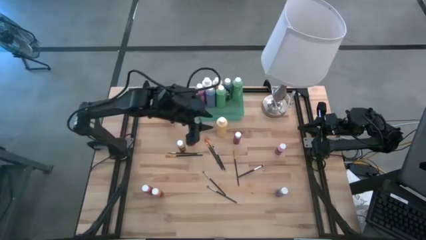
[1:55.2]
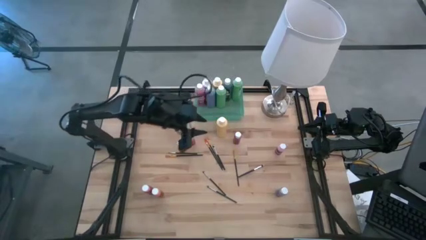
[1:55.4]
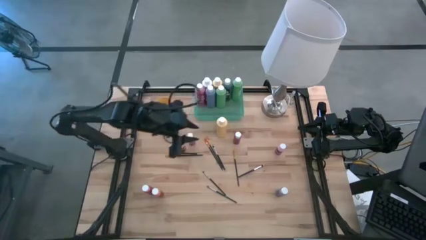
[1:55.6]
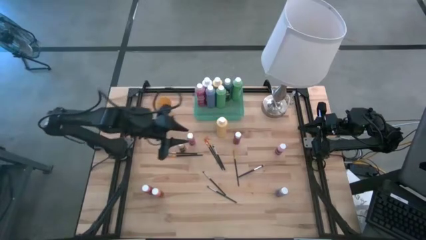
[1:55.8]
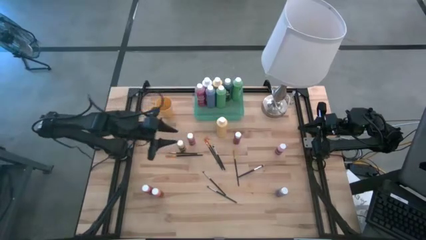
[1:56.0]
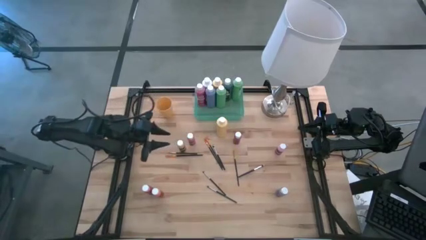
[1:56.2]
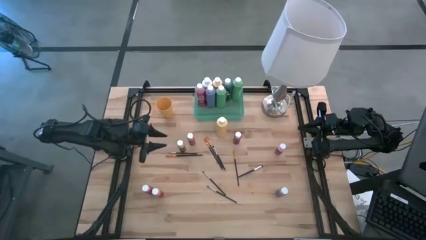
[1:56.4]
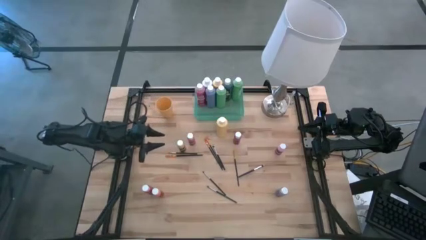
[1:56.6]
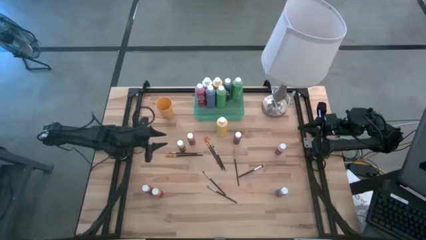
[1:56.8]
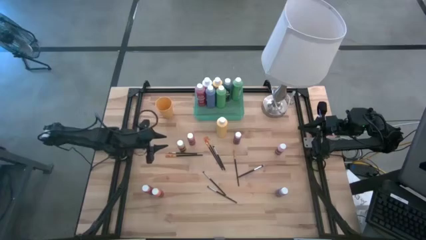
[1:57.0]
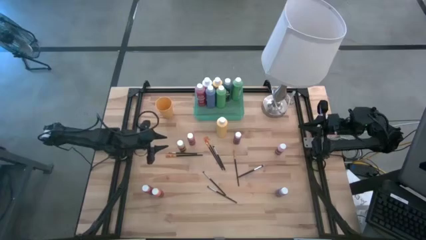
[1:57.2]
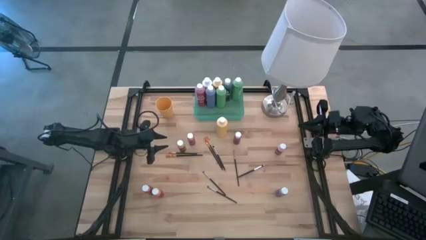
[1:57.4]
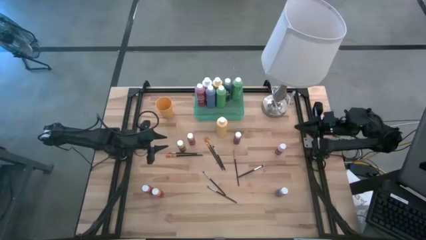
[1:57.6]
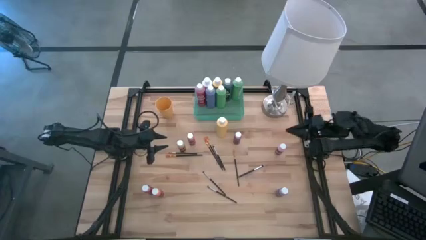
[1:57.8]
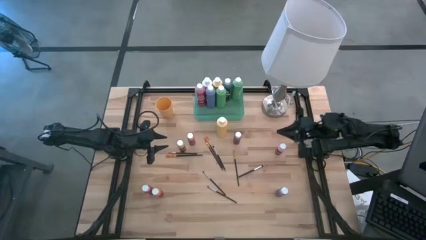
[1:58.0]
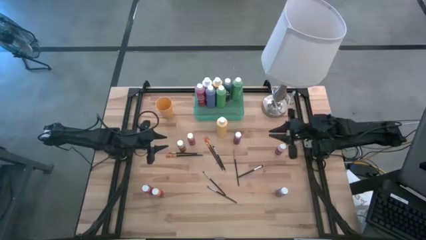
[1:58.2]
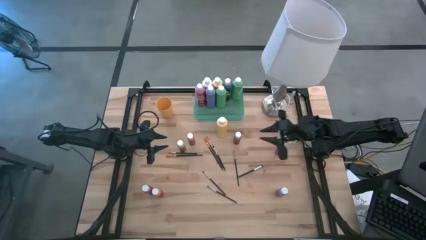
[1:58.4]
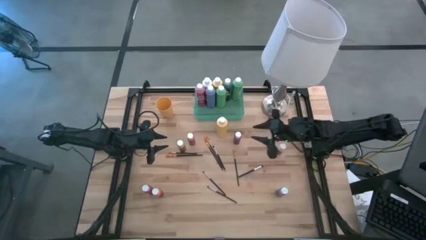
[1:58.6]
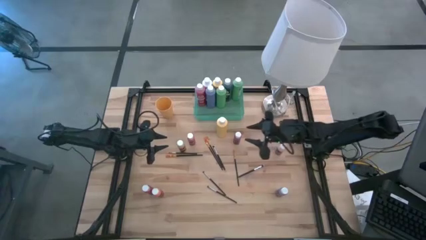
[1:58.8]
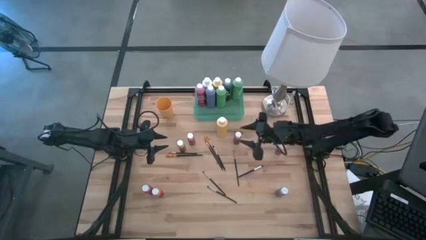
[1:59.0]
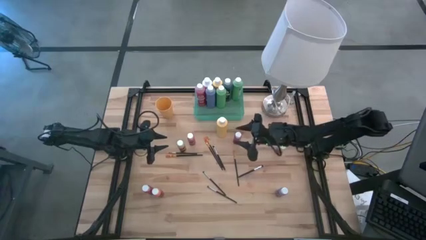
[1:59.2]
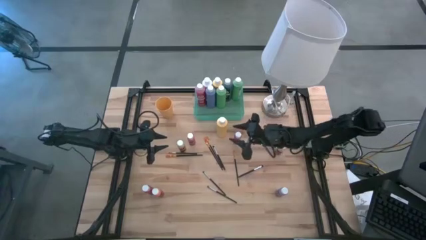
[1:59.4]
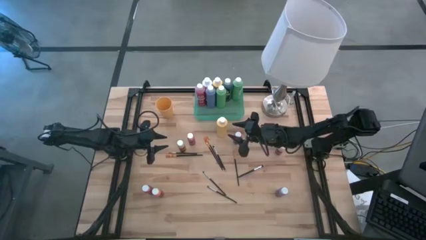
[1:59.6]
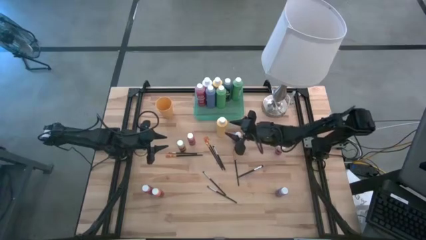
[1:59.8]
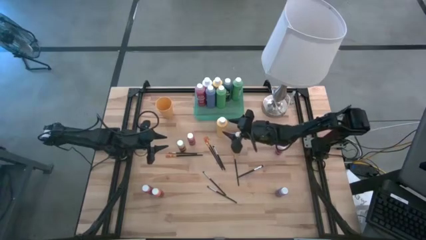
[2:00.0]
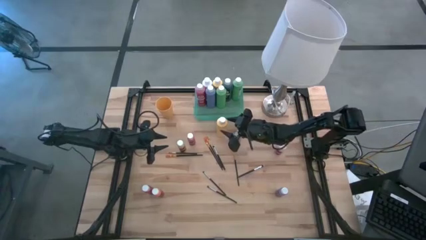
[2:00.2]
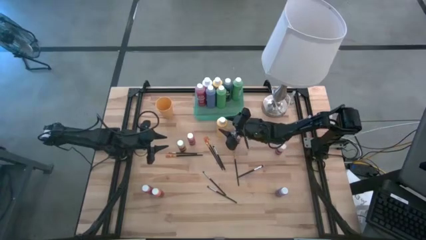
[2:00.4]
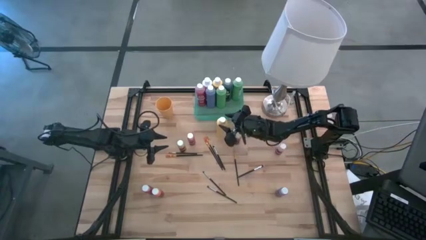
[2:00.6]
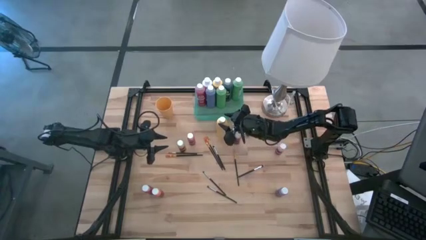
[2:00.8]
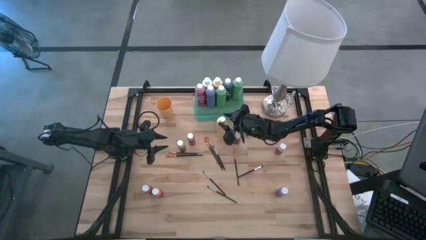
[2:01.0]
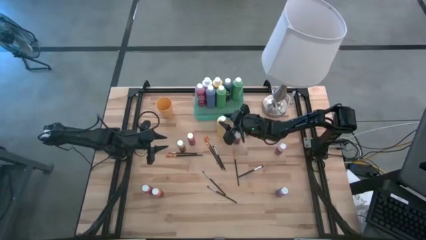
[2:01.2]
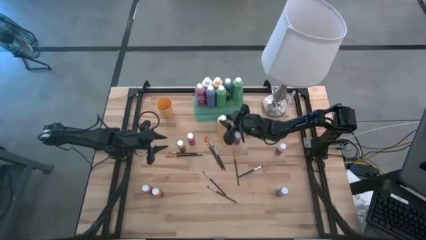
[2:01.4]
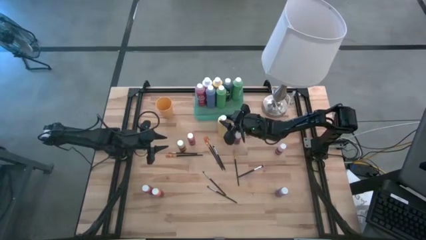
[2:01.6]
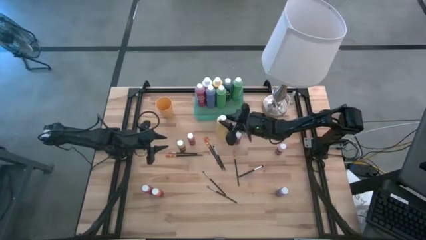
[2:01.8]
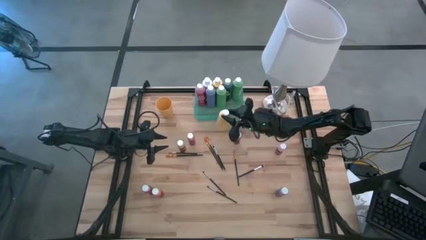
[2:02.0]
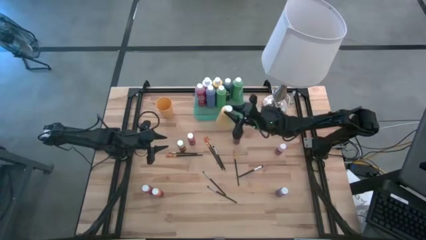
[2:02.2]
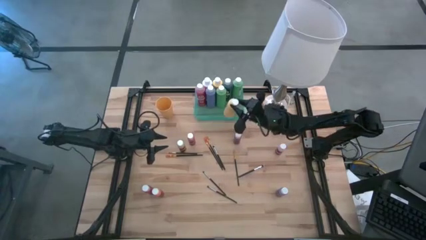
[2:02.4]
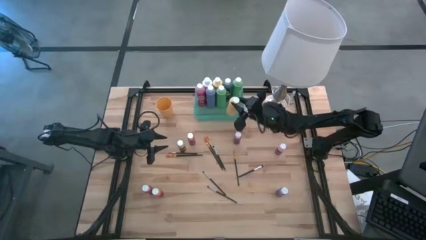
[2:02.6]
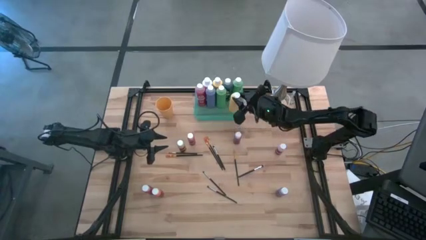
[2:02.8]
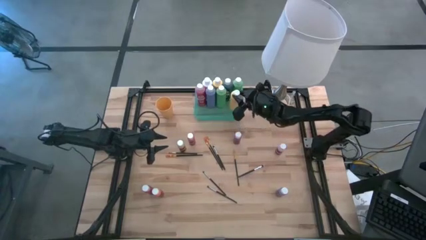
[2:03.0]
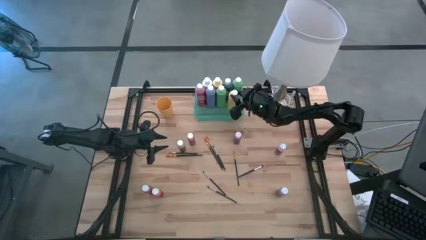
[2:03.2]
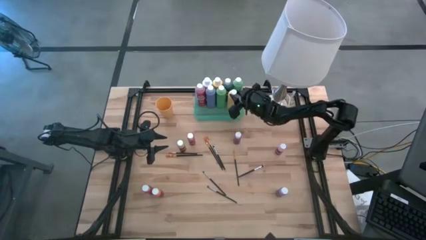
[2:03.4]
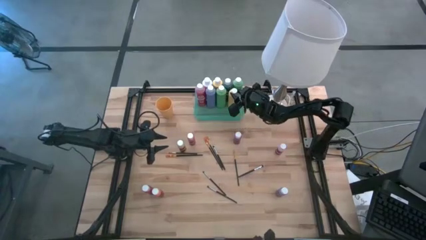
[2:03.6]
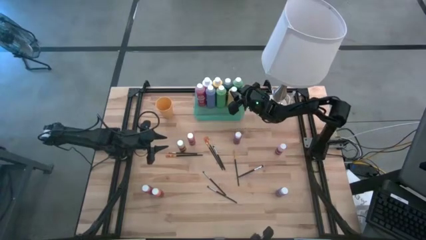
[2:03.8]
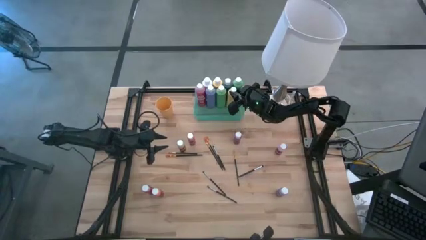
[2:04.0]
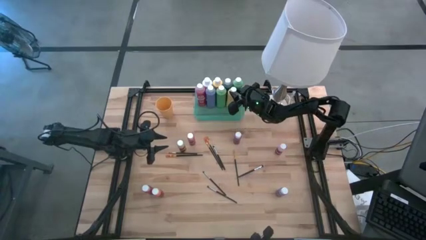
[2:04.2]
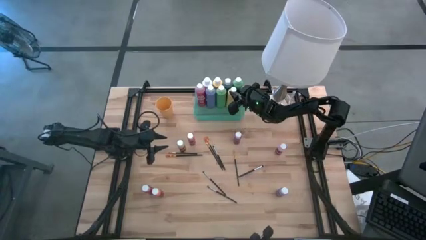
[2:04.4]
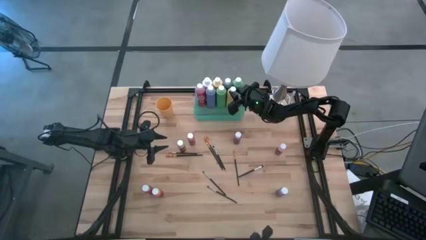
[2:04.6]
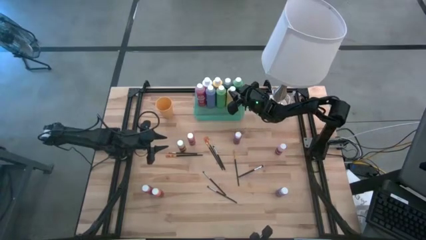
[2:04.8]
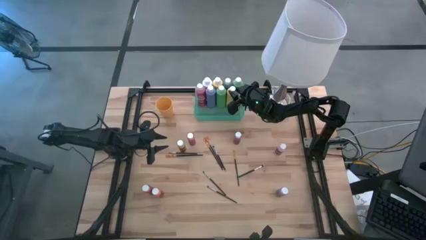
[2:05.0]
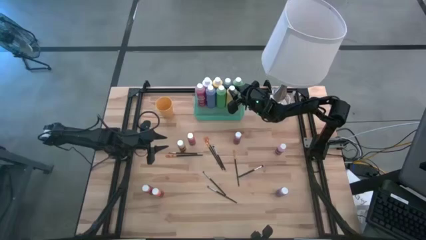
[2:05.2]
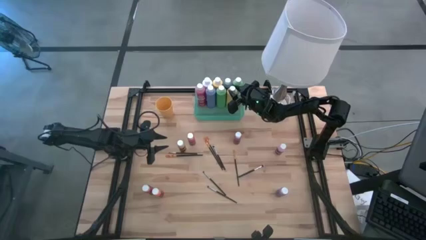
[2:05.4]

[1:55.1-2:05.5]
Task: Pick & Place Paint Supplies
Put the large yellow paint bottle into the green bin

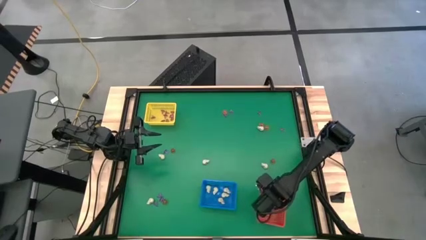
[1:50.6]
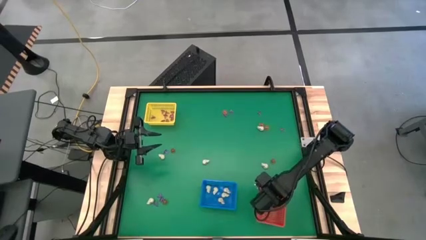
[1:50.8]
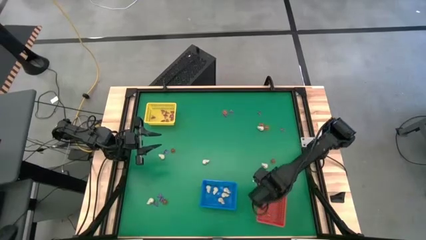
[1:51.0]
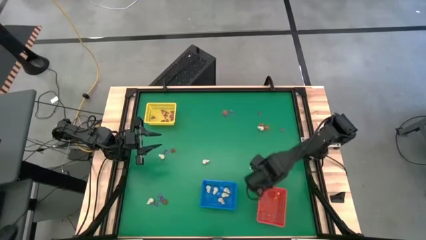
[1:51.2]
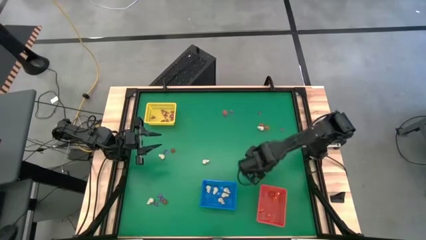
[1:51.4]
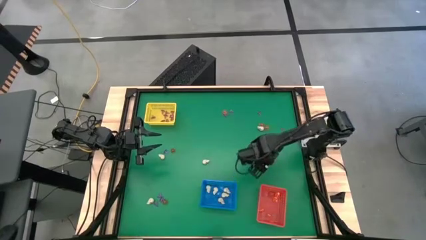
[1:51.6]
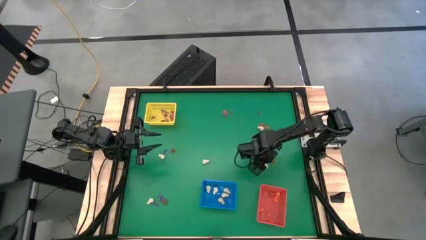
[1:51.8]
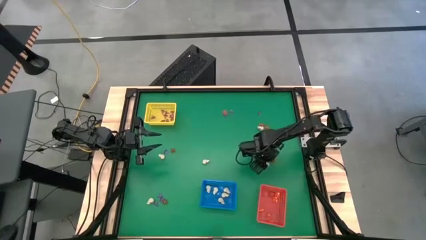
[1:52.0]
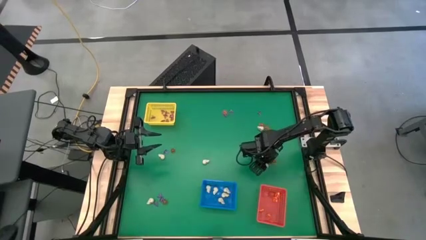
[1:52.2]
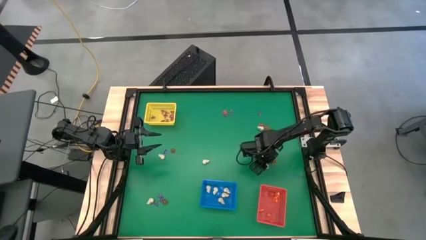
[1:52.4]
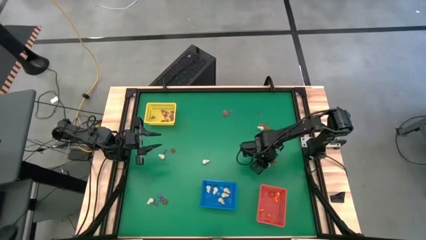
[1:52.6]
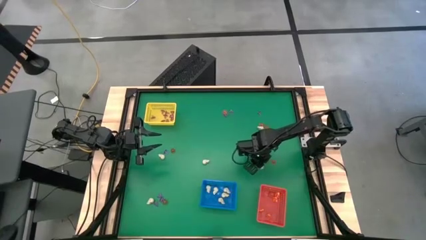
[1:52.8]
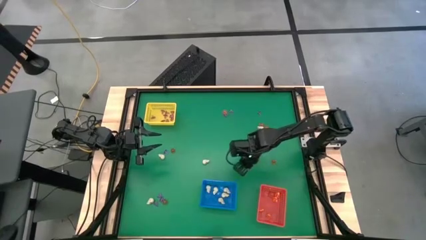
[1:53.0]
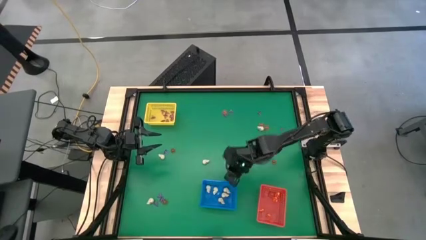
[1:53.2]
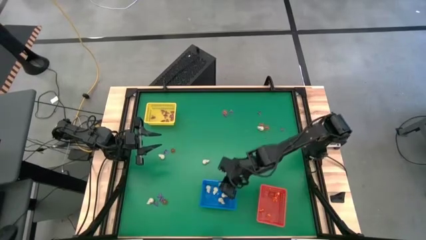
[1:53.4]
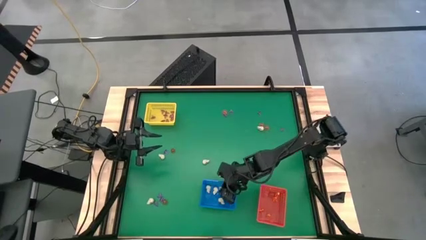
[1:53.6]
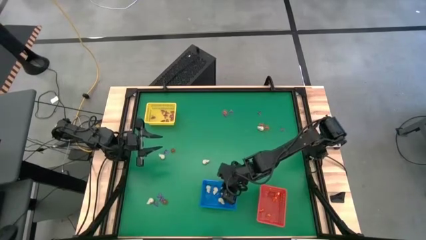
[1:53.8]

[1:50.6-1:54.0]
Task: Sort Halloween decoration
Put the white skull toy into the blue basket

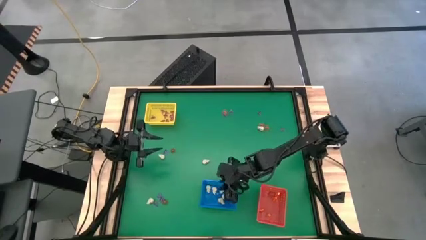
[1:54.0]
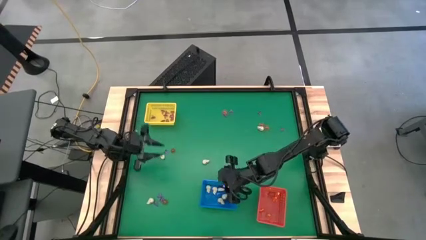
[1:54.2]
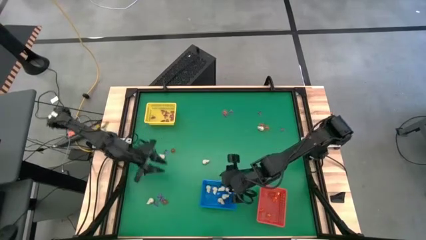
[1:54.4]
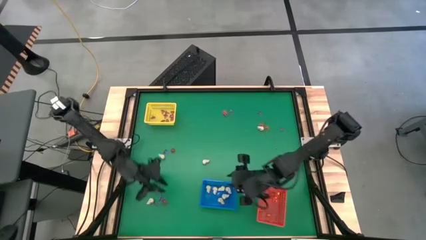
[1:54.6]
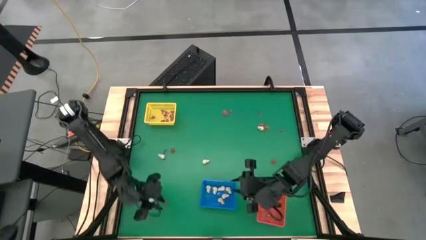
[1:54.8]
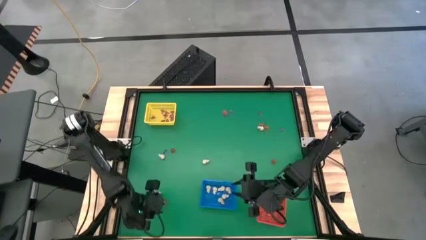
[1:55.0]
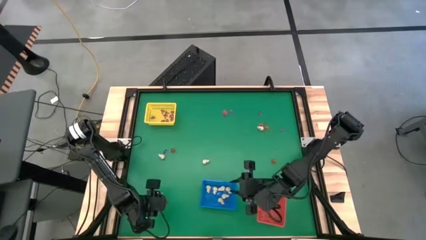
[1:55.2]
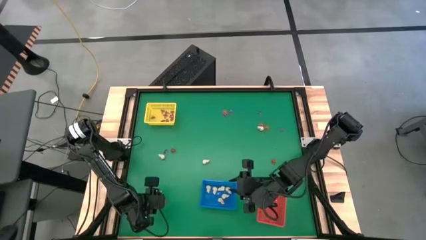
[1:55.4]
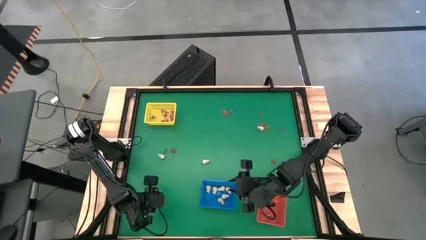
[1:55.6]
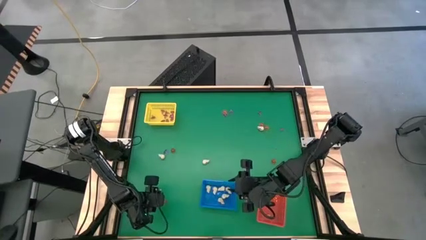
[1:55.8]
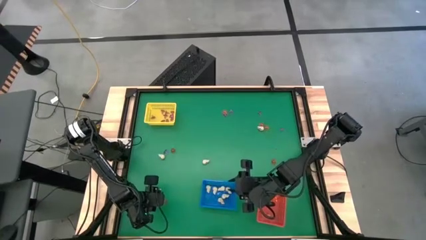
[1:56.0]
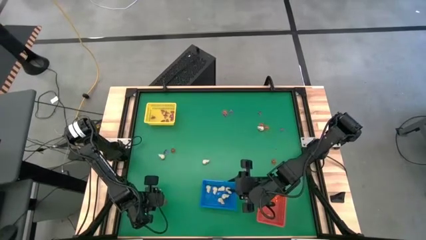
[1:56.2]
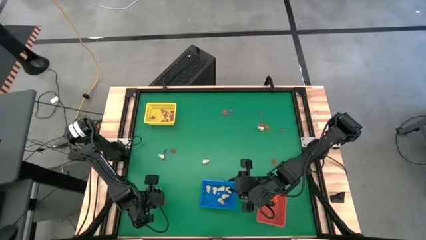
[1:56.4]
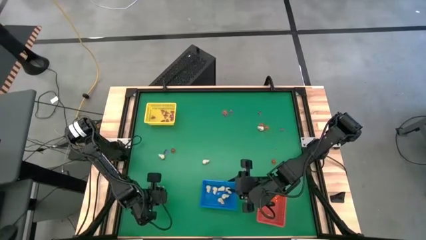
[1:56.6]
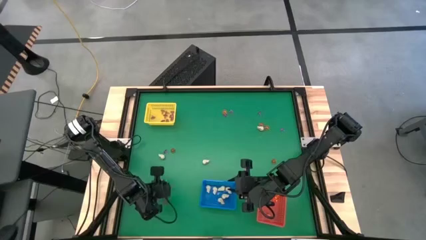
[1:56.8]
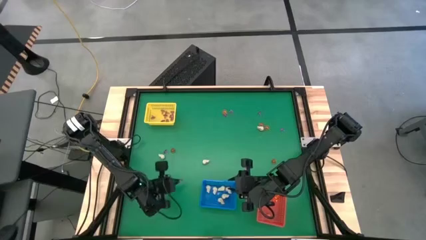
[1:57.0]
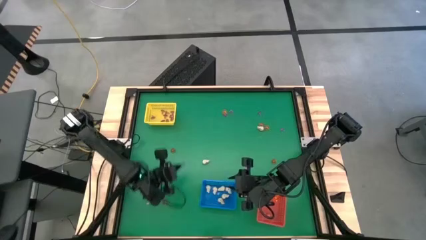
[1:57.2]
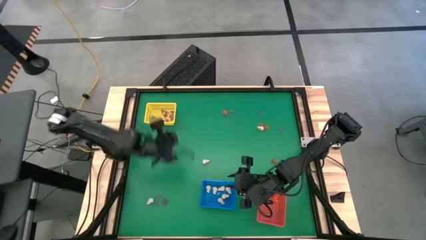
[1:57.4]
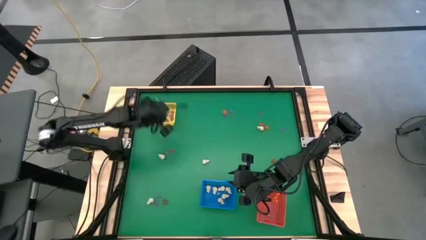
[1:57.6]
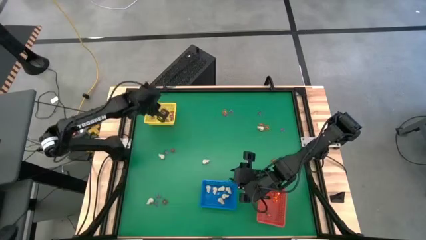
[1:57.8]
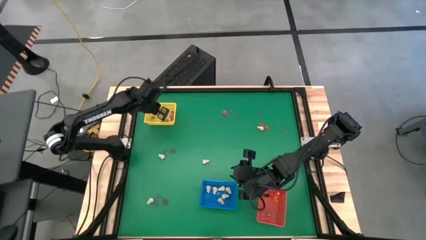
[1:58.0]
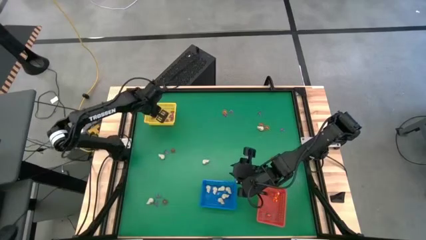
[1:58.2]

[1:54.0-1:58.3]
Put the purple witch hat toy into the yellow basket
